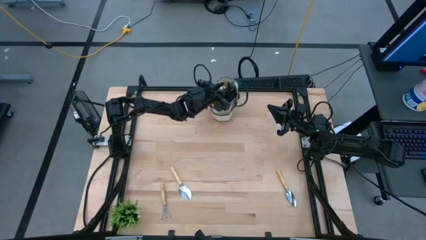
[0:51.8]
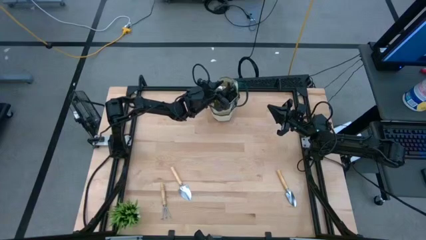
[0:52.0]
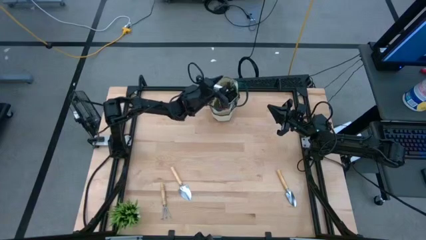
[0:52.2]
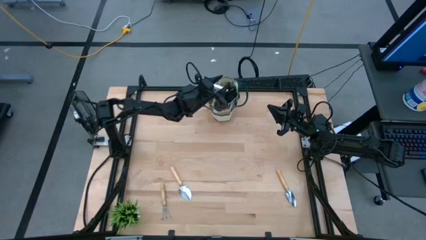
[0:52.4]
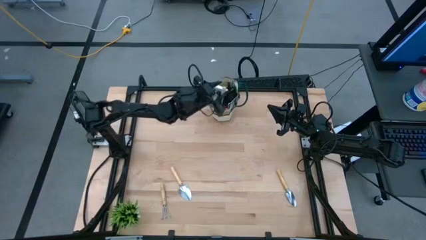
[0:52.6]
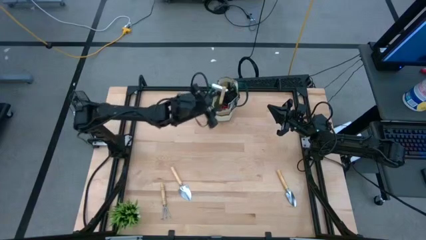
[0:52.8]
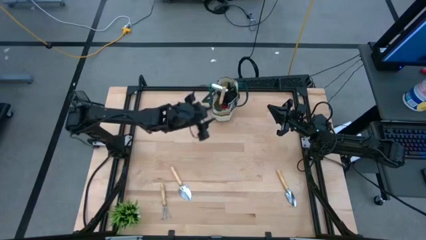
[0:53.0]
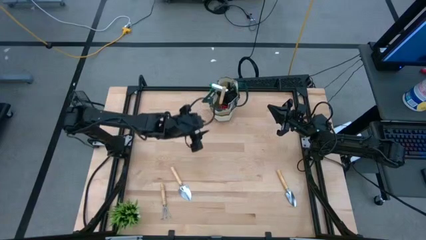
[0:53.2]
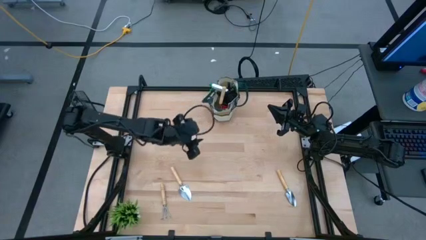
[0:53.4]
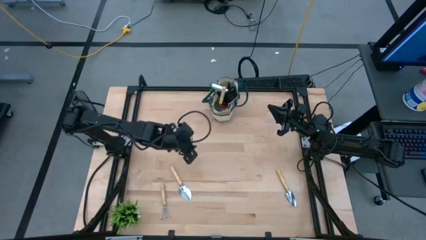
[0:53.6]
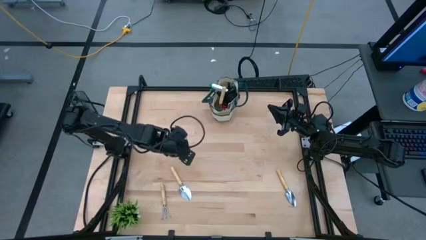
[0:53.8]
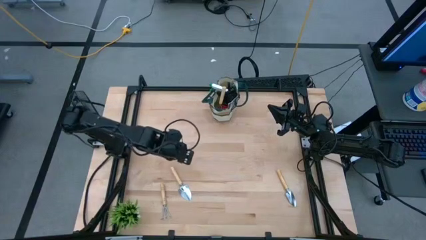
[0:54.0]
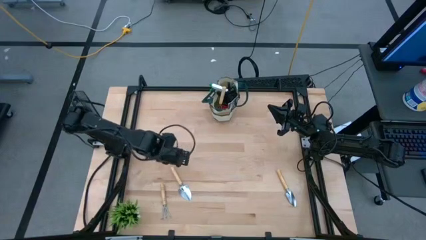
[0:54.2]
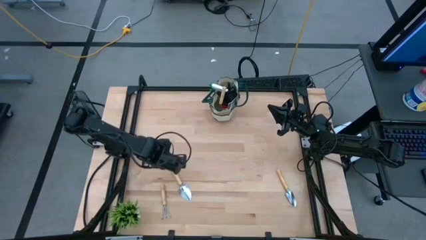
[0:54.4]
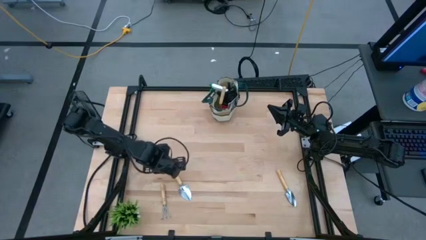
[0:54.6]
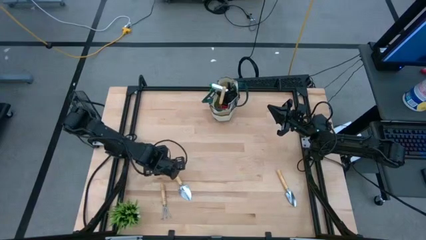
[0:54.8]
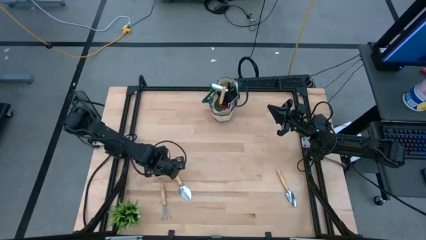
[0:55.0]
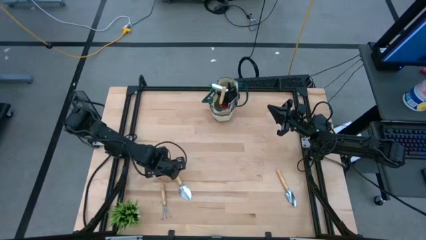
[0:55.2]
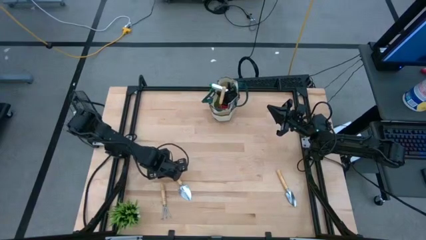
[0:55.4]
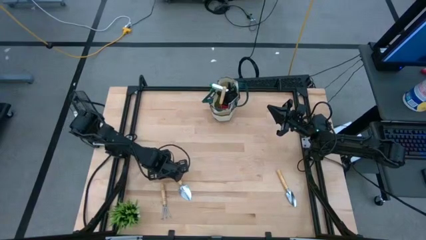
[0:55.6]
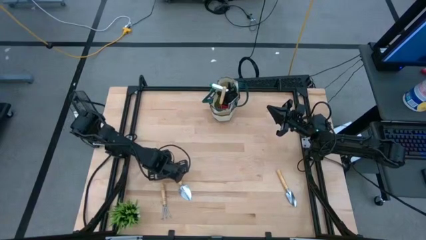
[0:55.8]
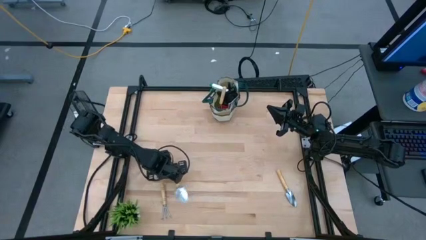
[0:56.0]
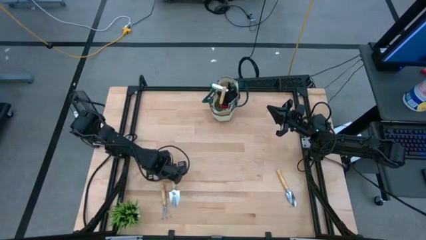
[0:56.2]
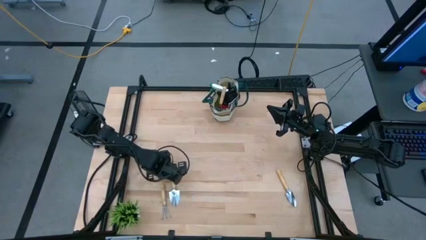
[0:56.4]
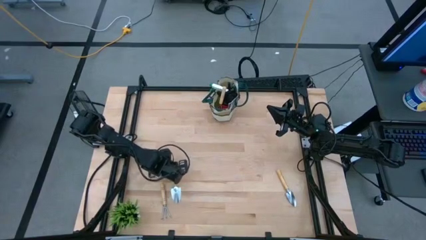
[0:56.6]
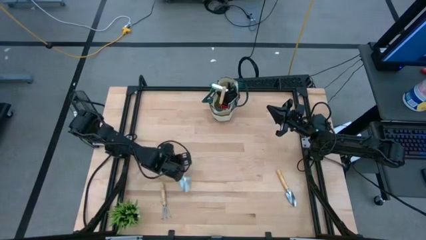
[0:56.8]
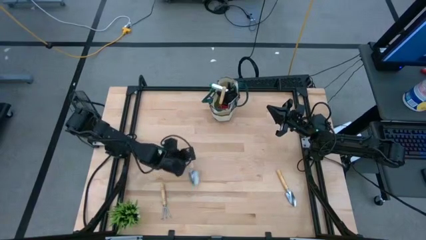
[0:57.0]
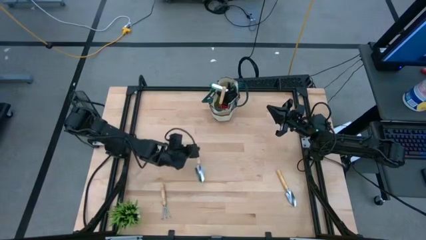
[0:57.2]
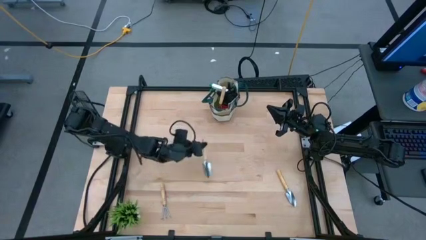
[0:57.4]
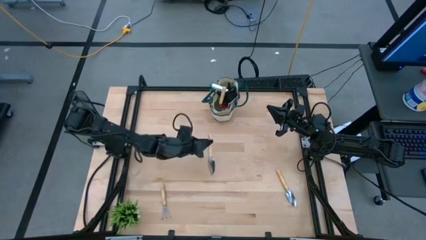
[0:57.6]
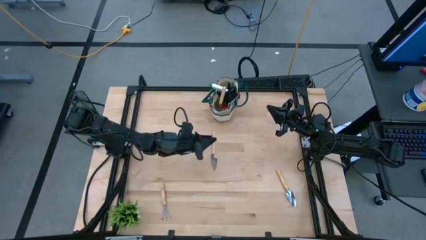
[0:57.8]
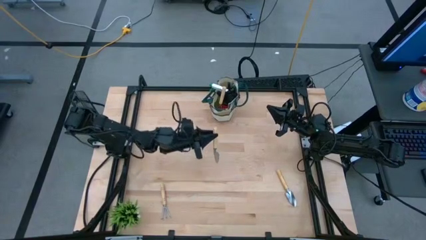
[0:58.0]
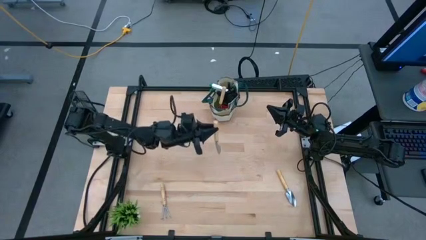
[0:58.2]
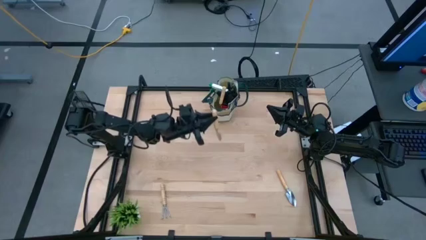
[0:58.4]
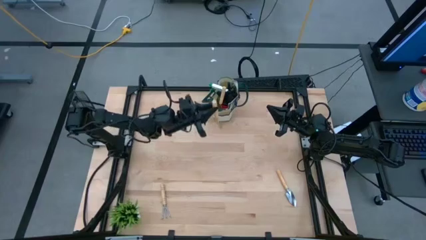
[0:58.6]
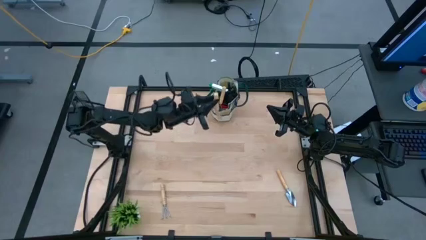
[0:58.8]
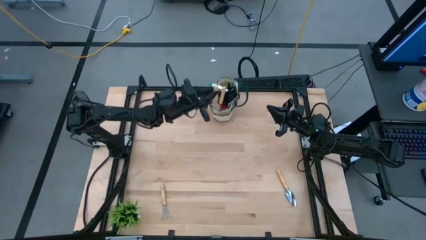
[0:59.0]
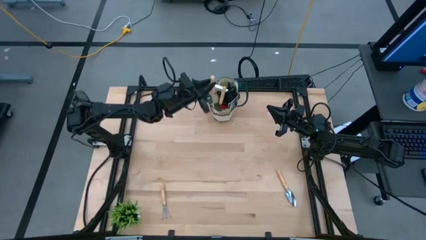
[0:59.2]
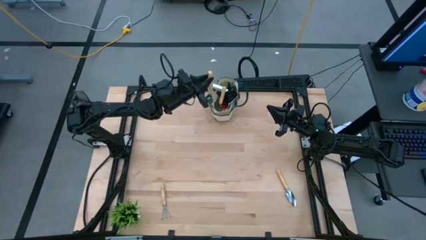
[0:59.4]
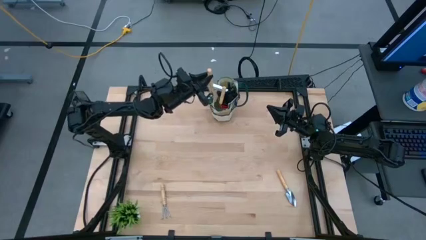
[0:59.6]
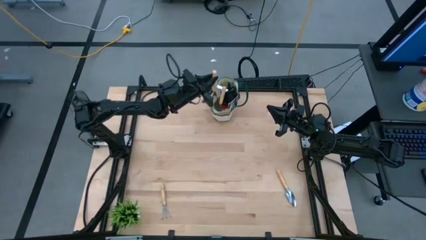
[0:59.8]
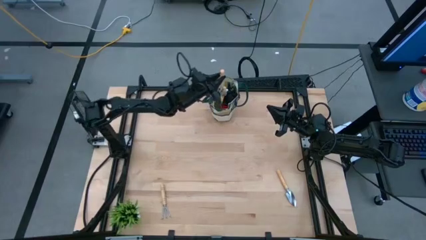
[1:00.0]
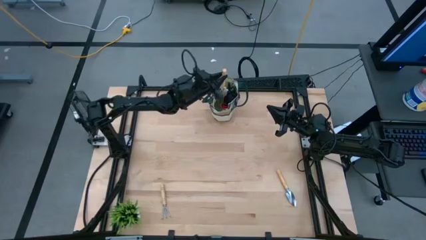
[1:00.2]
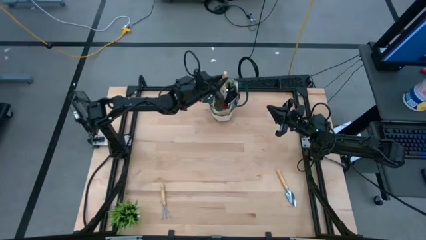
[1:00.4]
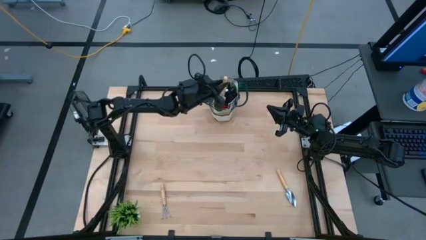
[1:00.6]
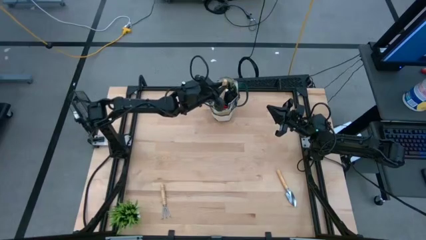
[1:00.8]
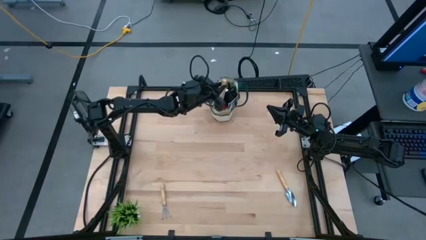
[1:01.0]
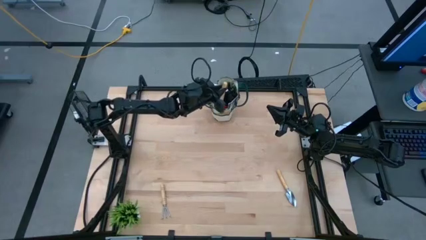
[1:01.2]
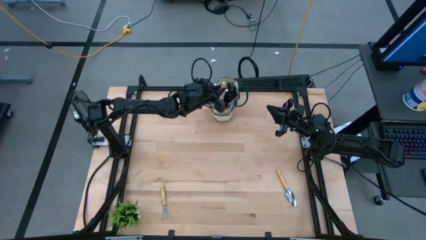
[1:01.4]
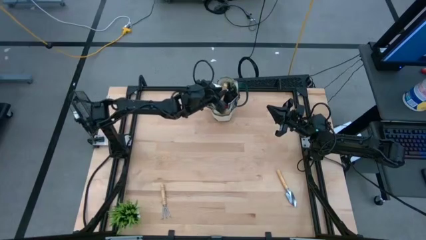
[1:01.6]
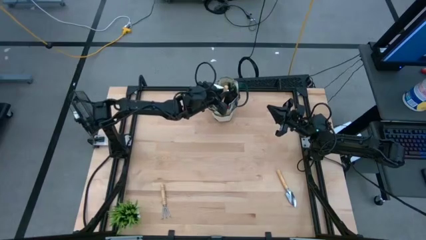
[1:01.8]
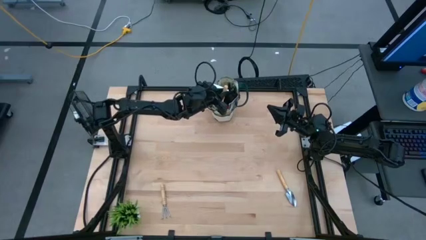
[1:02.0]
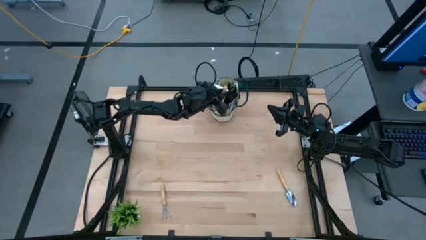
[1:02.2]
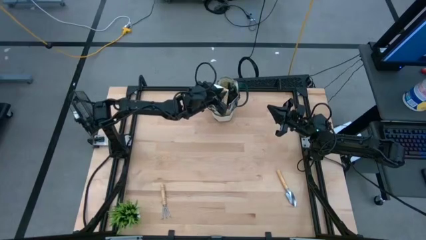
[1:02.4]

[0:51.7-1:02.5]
Task: Pick & Place Garden tools in Gardening bag
Put the left trowel into the gardening bag

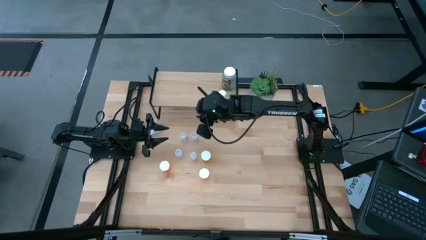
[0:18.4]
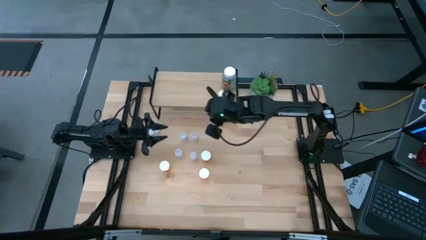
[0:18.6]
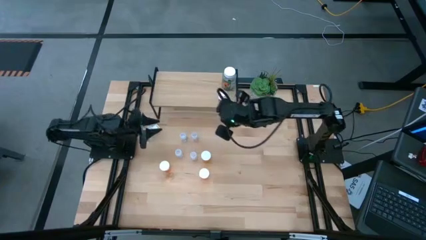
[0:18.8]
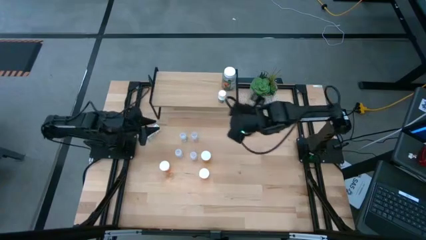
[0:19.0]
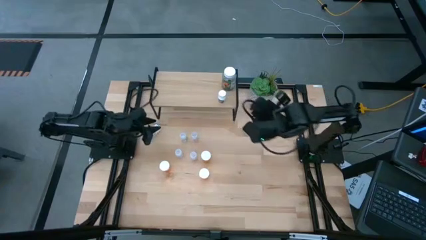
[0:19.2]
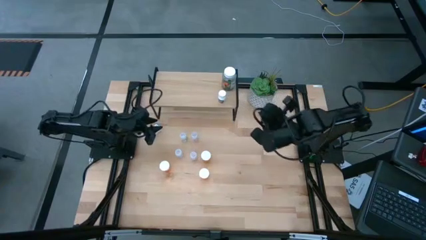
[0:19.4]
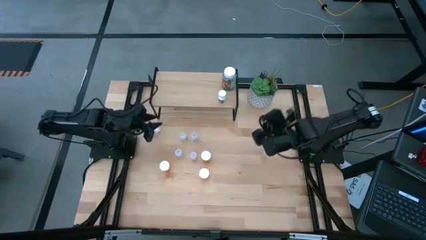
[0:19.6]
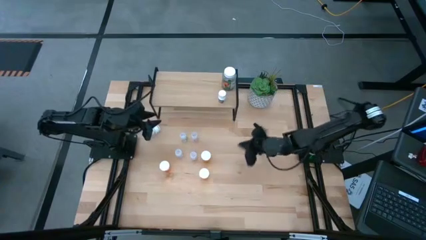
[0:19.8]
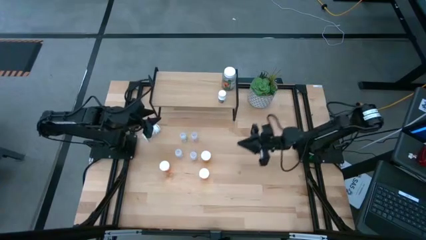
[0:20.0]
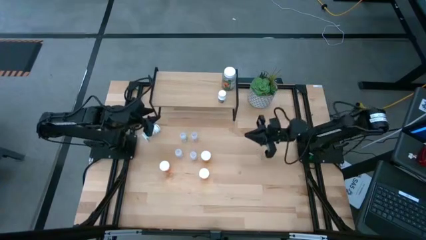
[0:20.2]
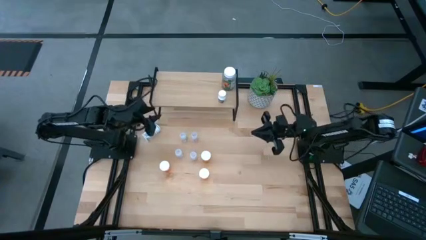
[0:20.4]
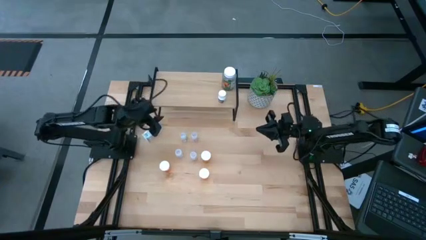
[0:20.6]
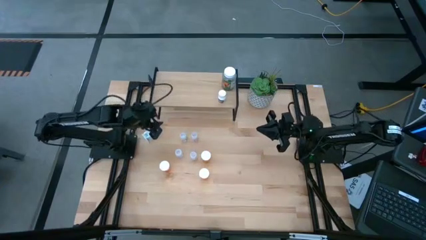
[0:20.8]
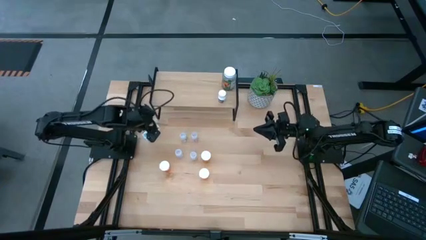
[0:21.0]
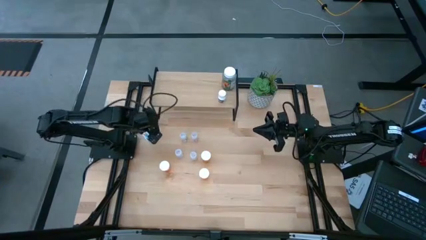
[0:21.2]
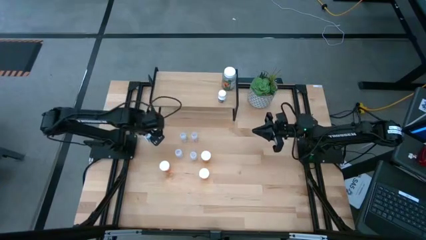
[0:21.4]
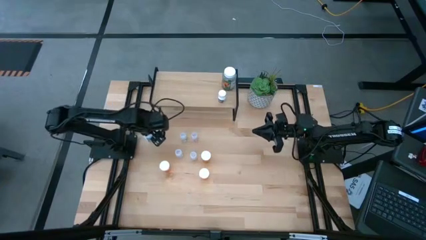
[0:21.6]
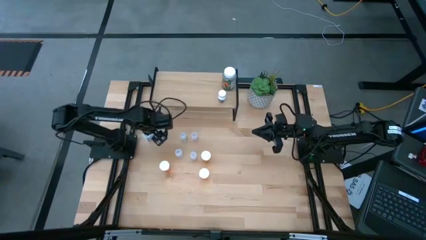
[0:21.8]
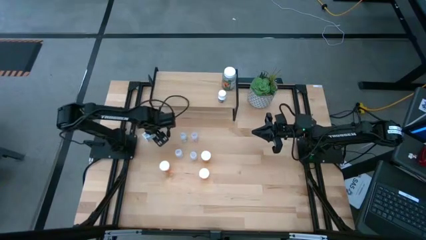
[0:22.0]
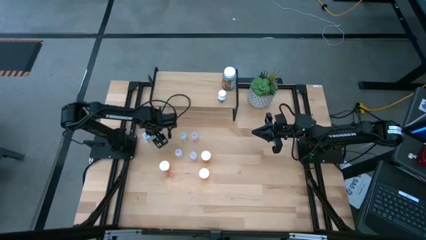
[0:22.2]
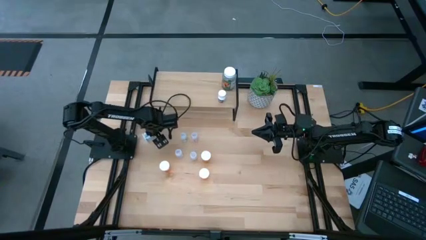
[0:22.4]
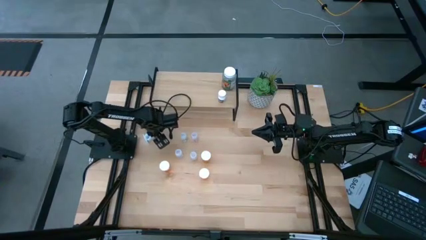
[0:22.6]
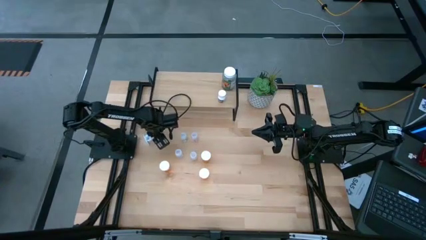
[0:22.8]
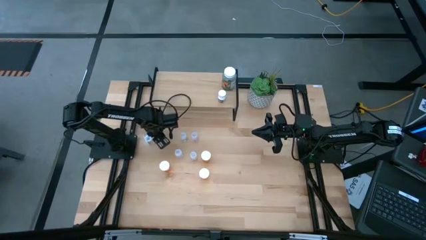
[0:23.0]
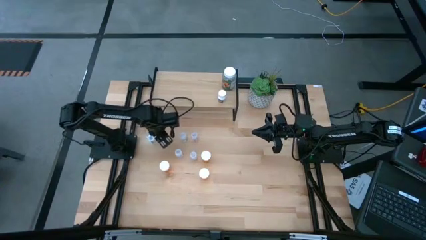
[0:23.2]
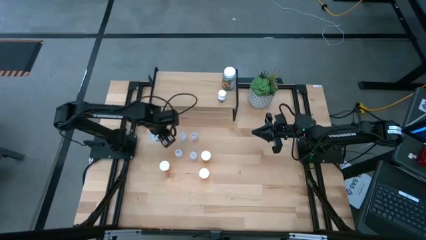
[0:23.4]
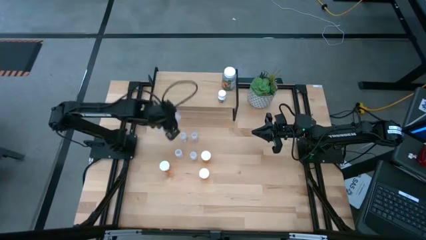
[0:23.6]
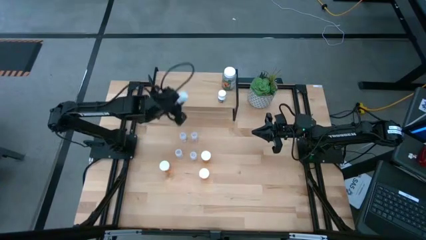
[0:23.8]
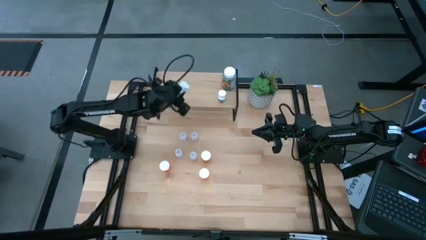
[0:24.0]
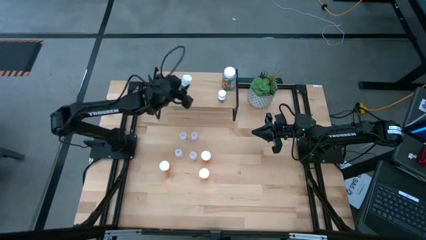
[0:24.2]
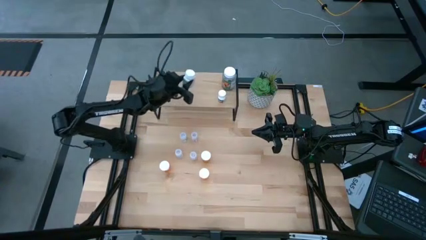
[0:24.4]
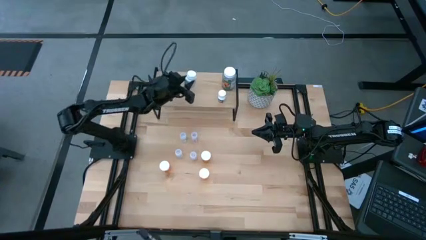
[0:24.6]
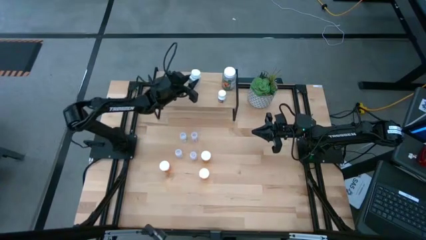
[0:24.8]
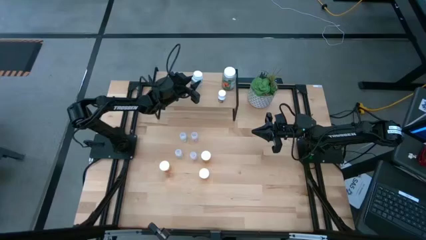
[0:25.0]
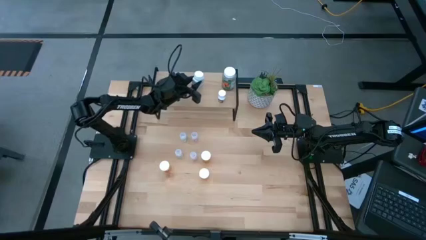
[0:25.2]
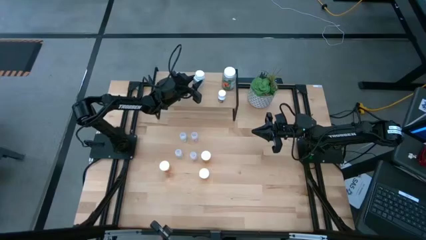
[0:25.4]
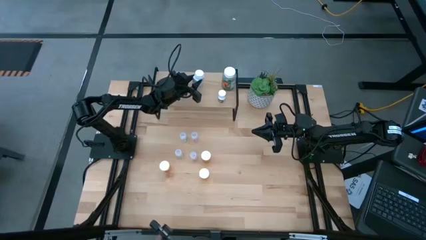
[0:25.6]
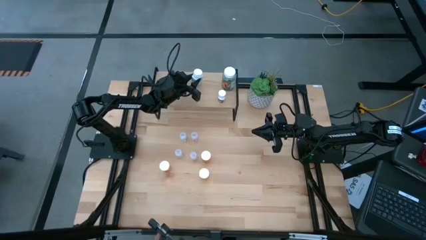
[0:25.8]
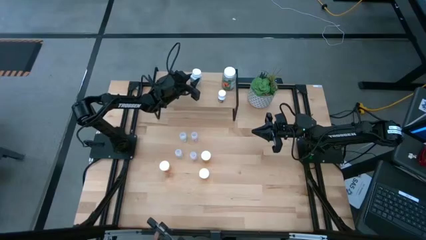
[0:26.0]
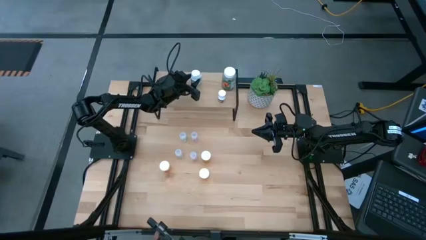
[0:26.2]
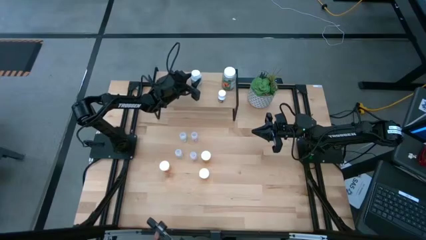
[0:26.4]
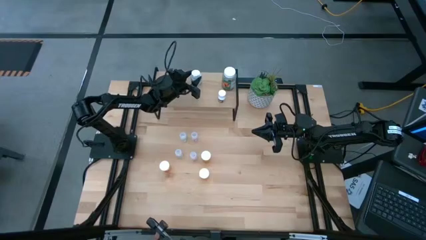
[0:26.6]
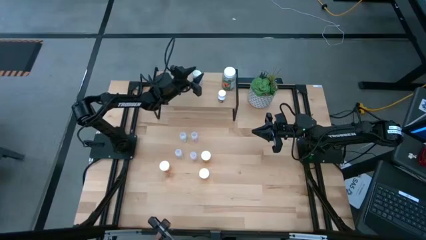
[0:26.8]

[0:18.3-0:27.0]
Task: Pick and place medicine bottles onto shelf by color
Put the white blue pill bottle on the shelf
